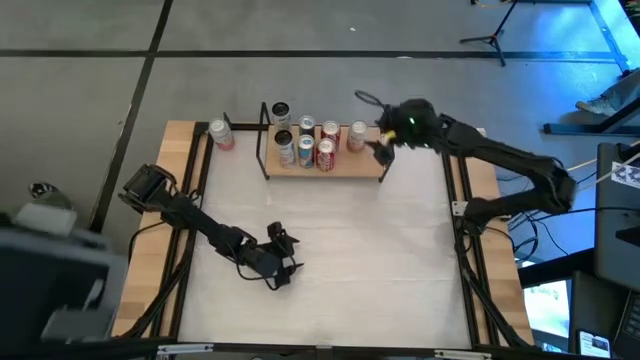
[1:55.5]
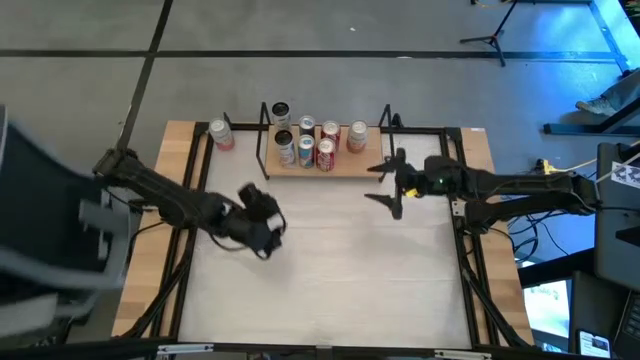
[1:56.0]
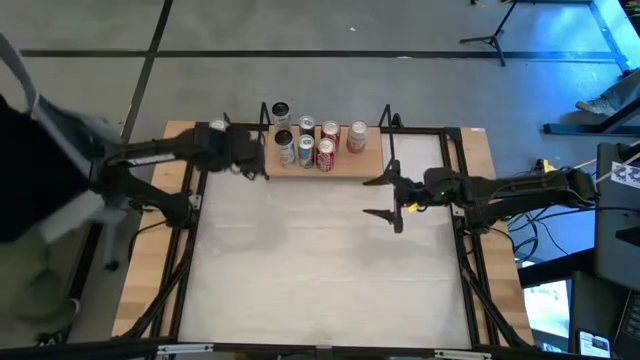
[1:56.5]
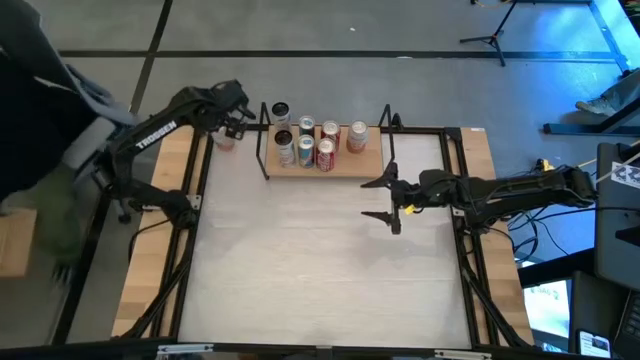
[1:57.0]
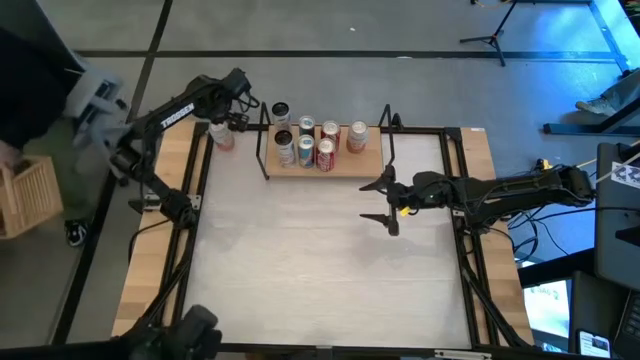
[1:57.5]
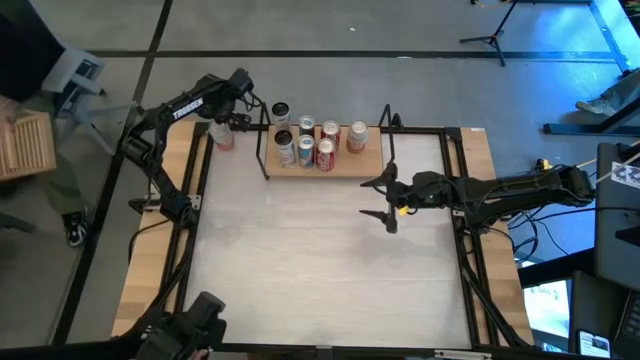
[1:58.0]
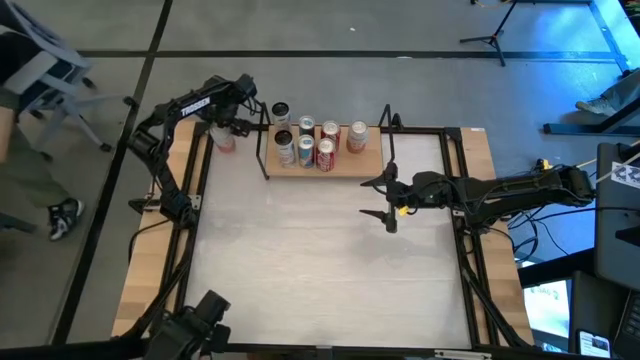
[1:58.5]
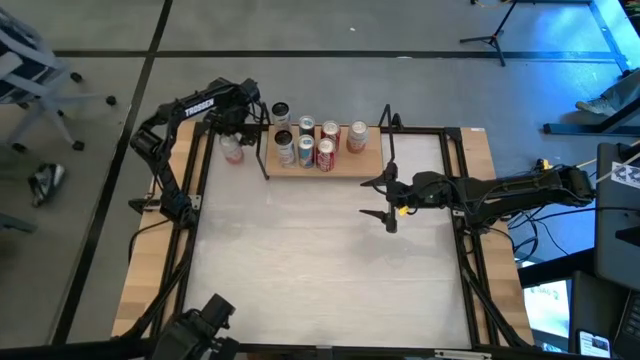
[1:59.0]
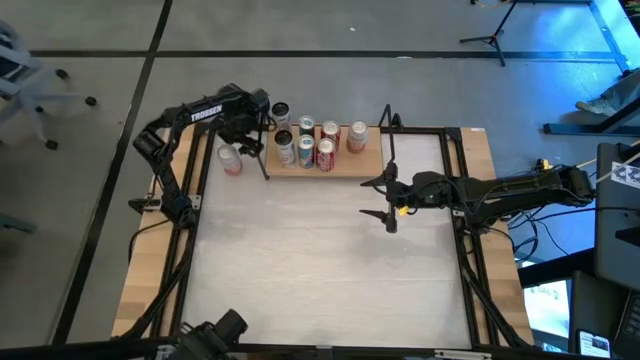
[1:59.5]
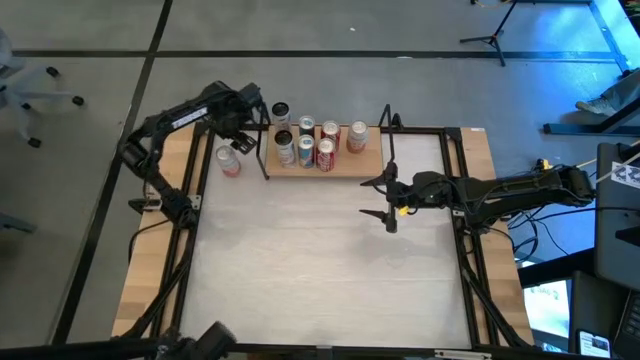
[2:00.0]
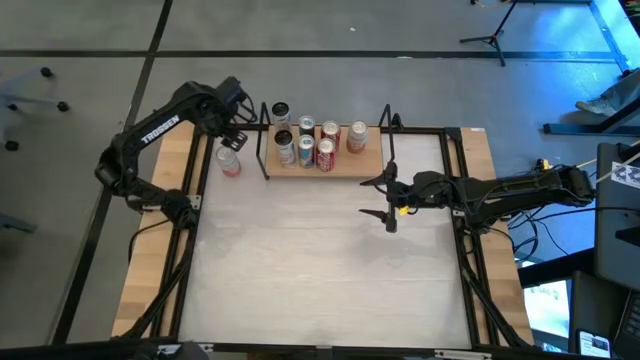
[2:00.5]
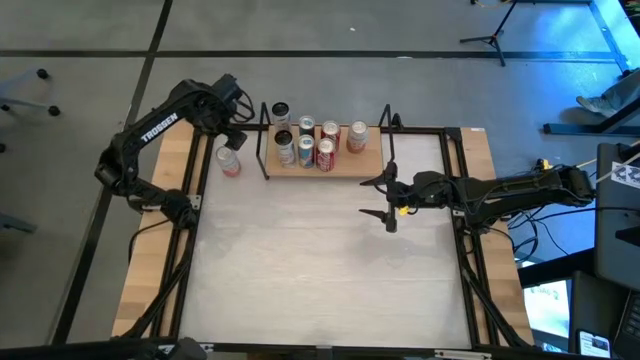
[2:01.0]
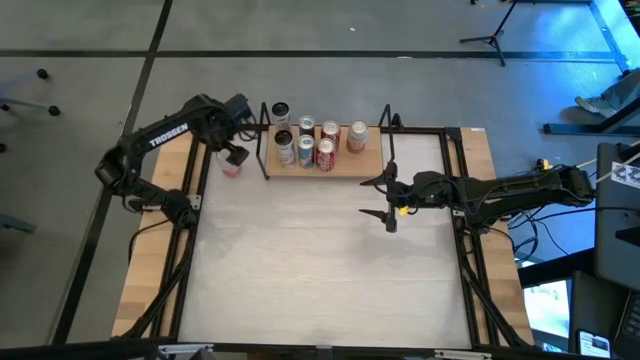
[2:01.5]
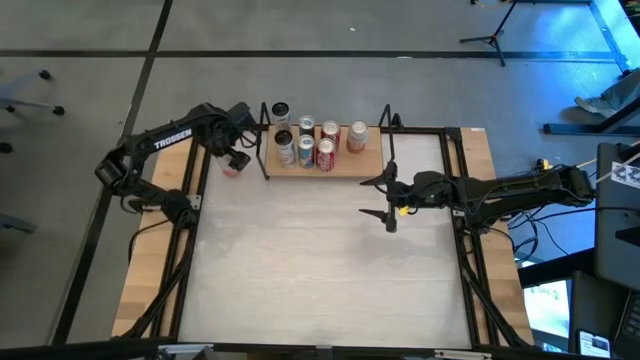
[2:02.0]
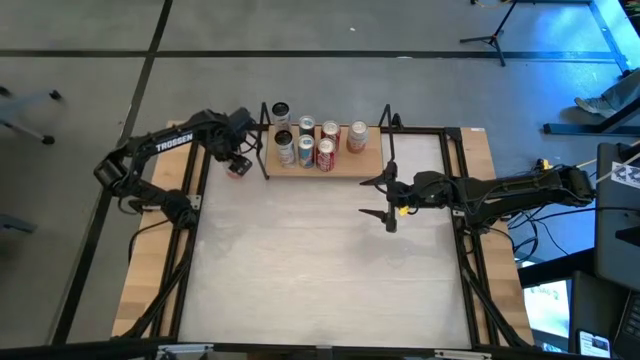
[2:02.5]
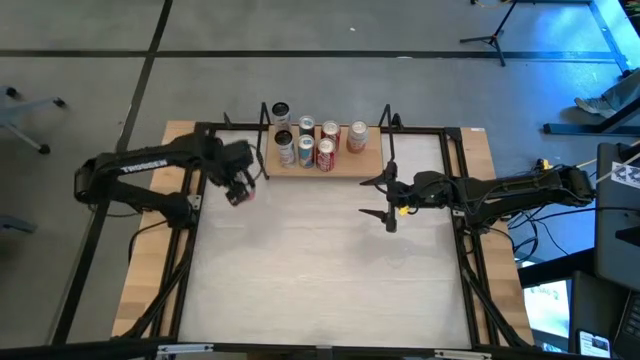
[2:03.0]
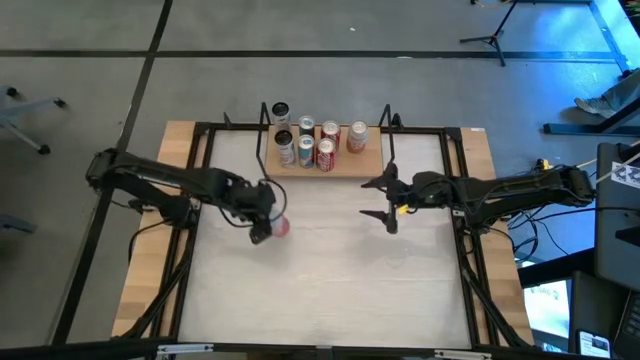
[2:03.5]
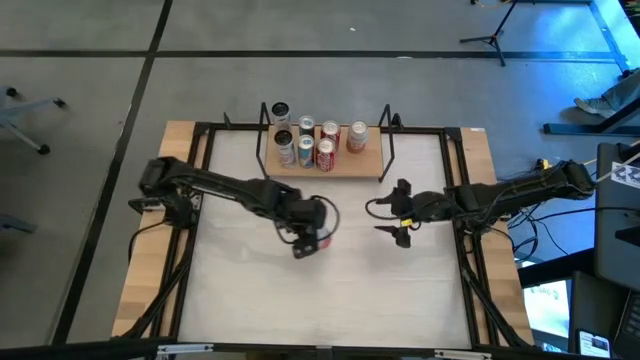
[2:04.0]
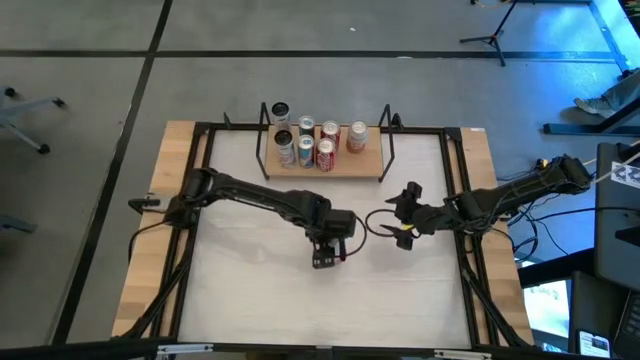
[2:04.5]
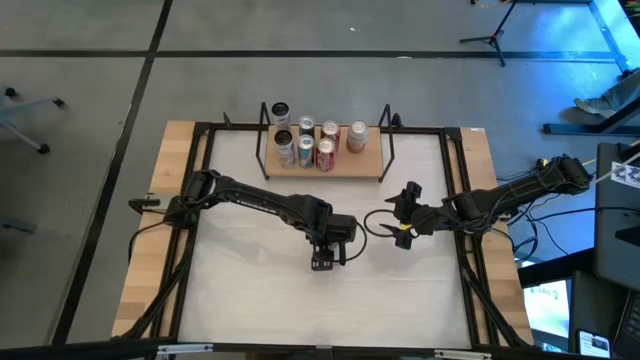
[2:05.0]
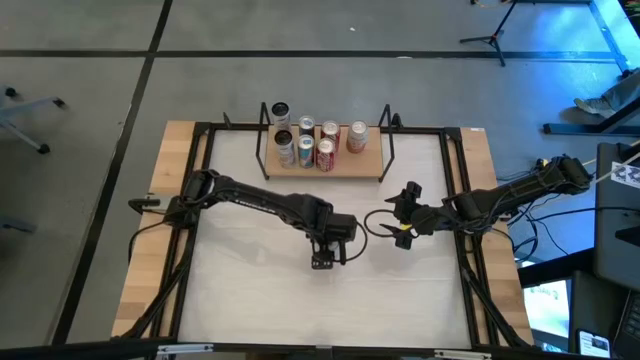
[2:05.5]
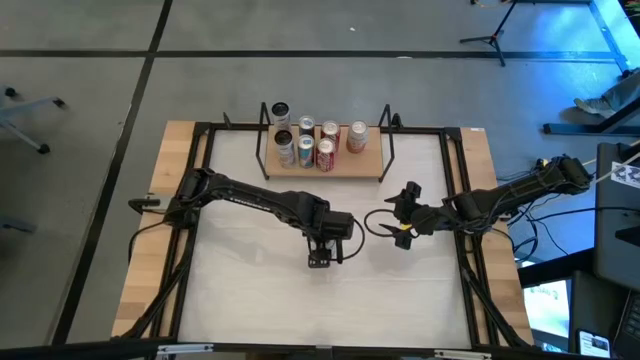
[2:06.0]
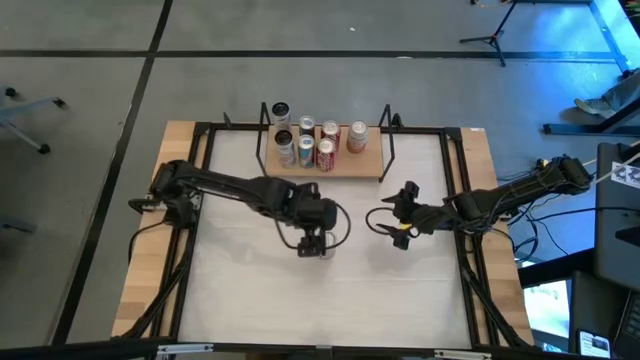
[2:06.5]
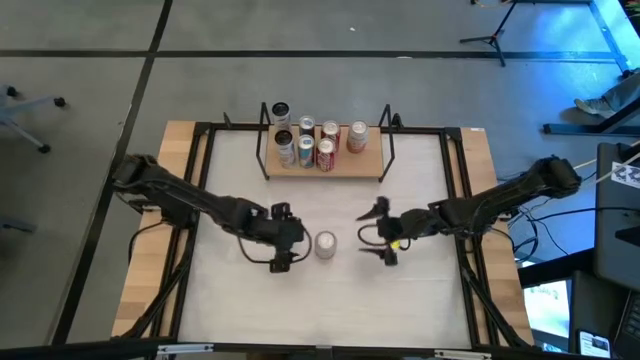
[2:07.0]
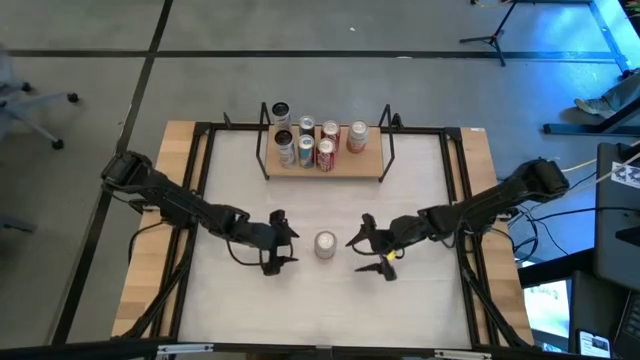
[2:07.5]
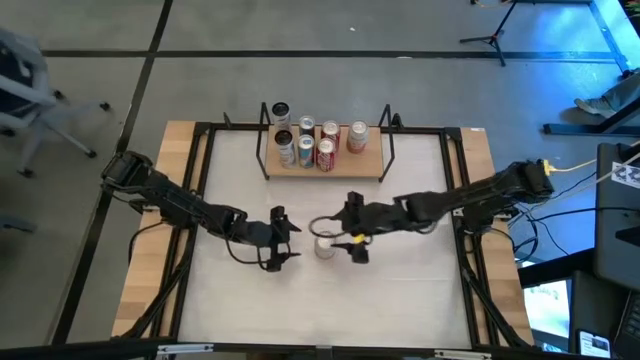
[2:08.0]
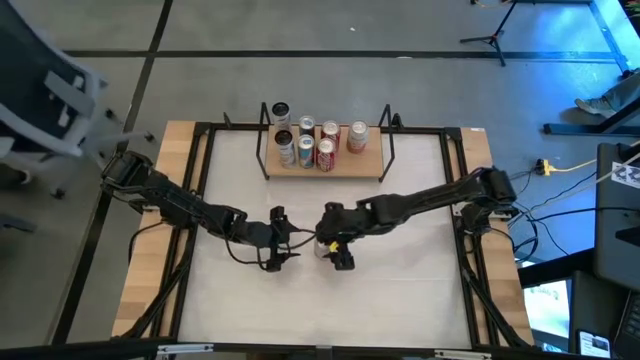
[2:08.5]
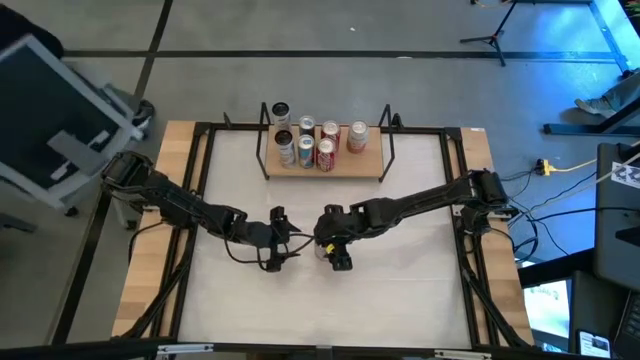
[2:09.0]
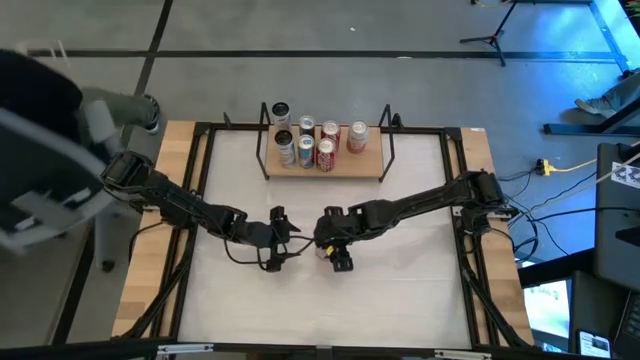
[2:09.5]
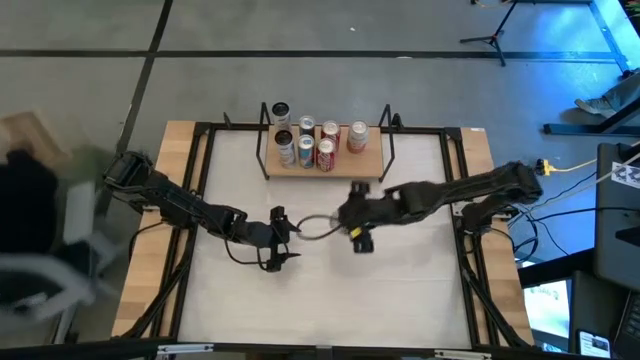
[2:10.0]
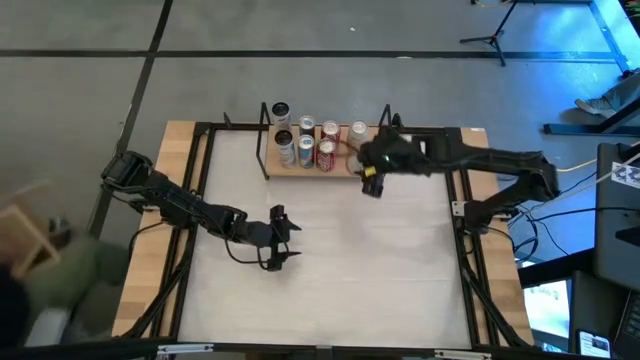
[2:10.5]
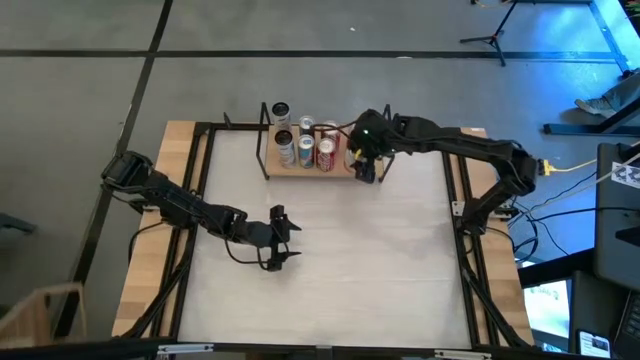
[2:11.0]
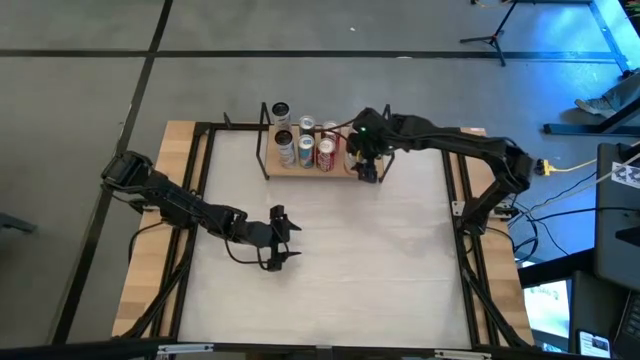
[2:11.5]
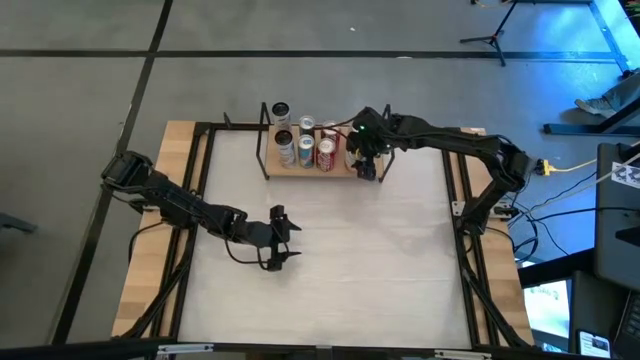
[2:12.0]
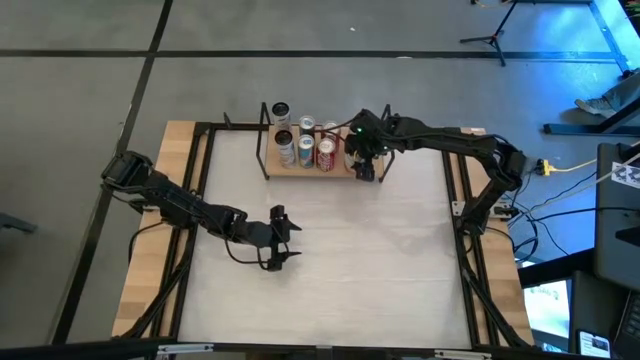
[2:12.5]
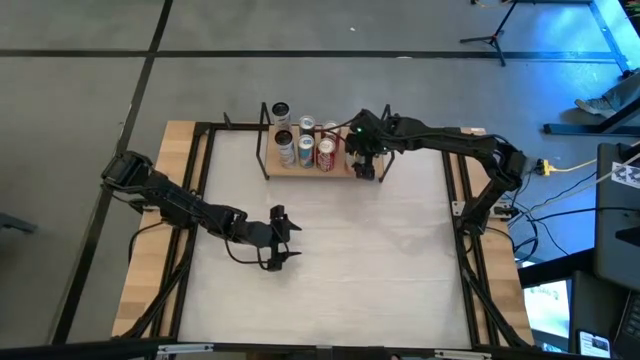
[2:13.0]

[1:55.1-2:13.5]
Task: Place canned beverage on shelf
Put the orange-white soda can on the shelf aligned with the other orange-white soda can
